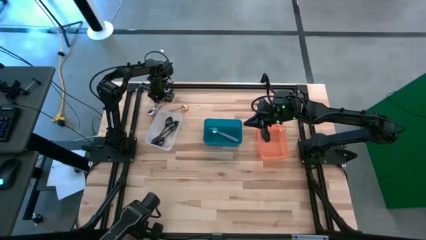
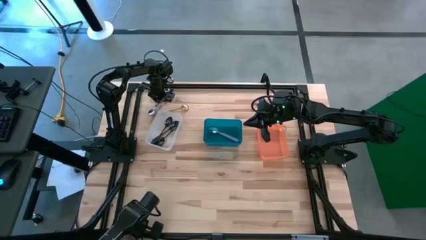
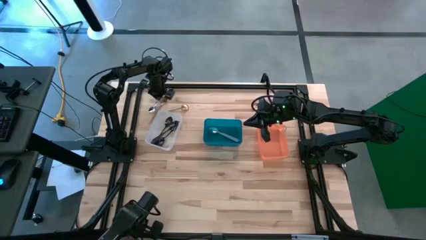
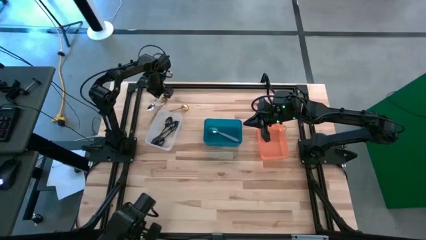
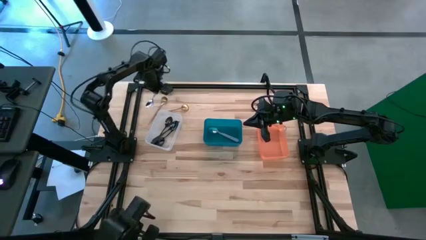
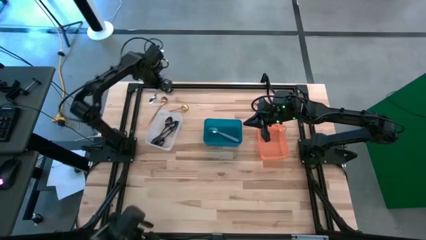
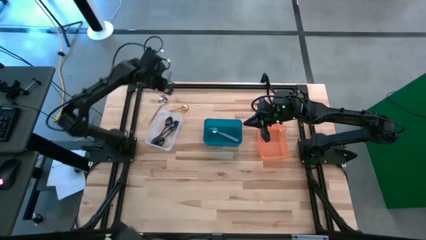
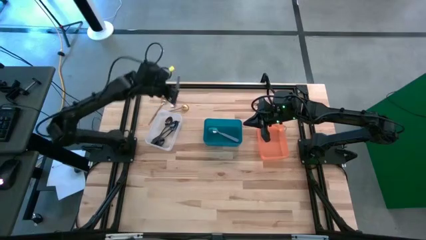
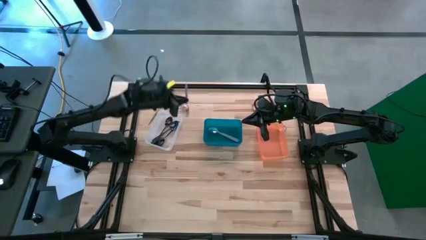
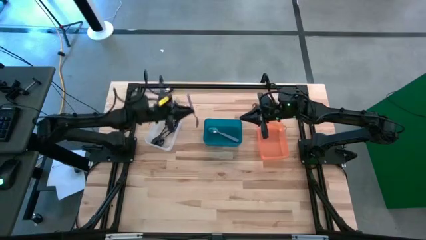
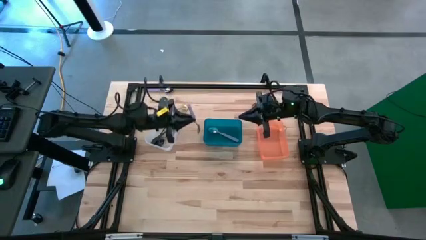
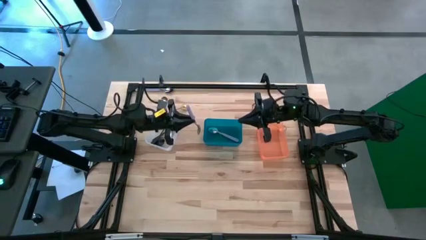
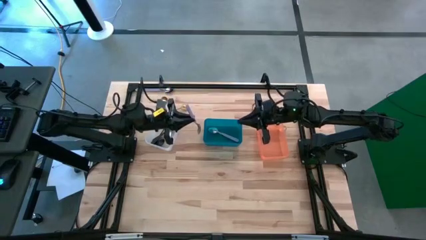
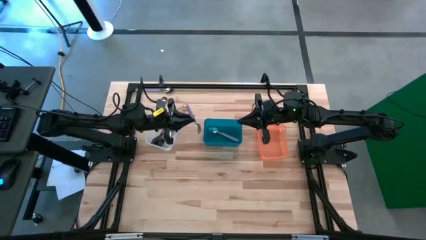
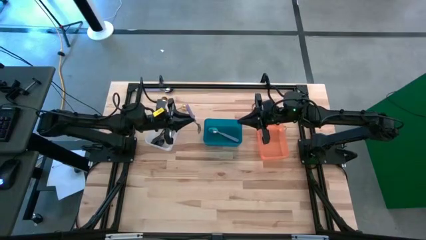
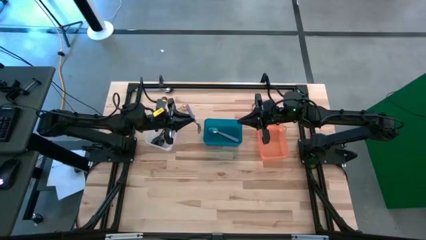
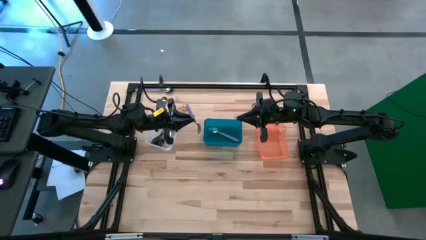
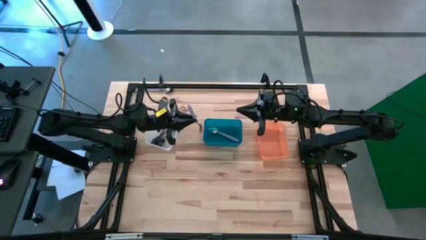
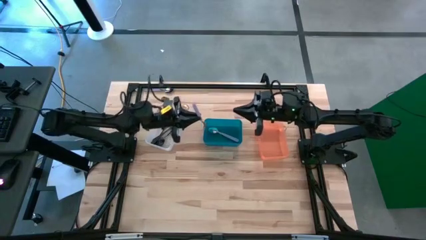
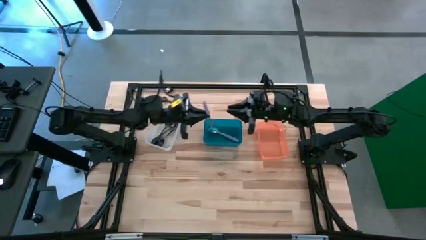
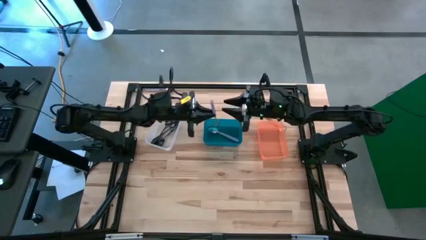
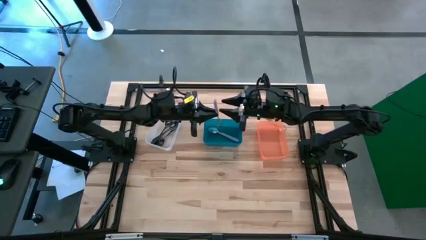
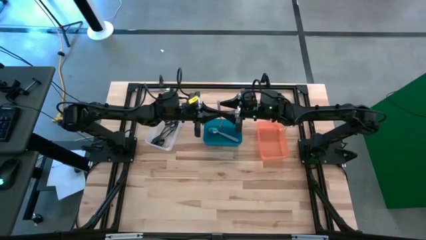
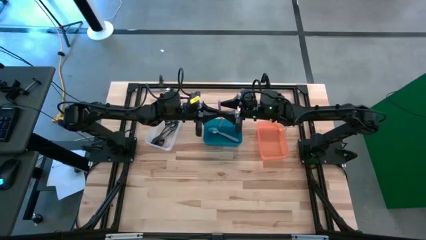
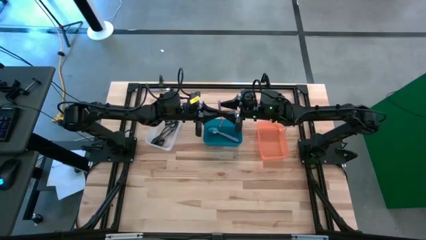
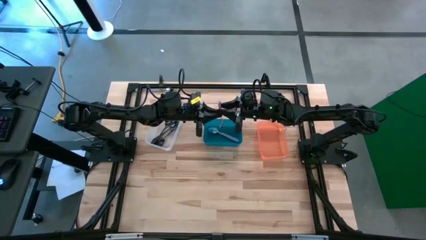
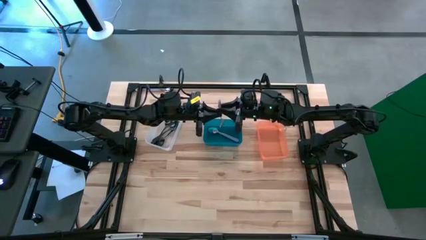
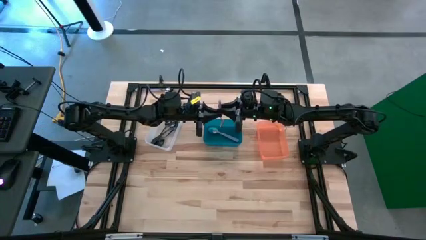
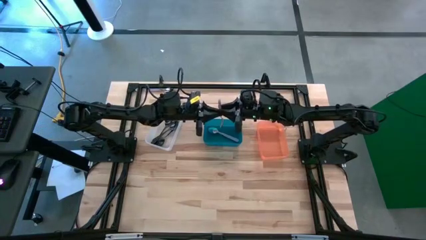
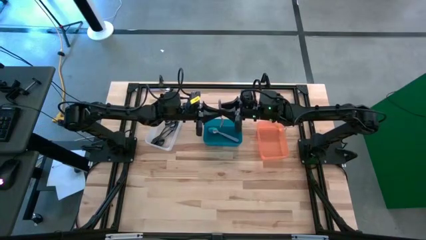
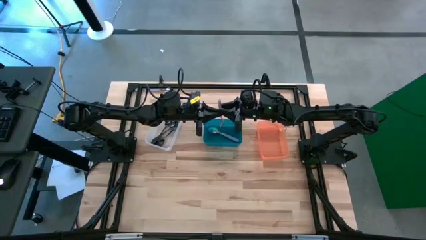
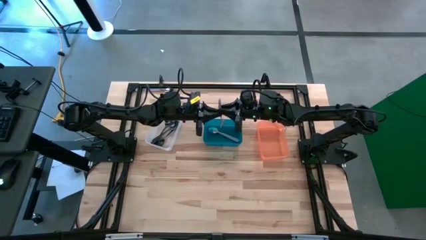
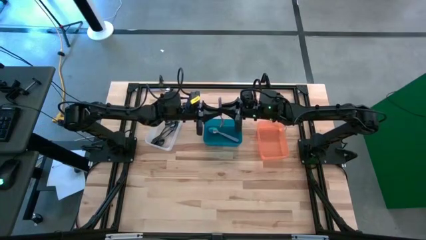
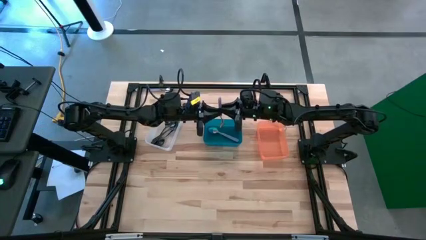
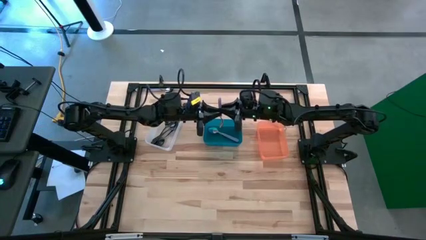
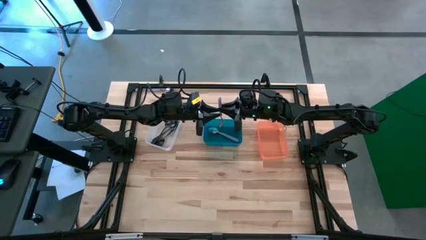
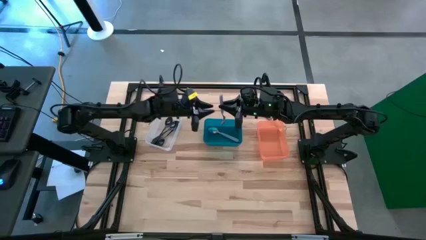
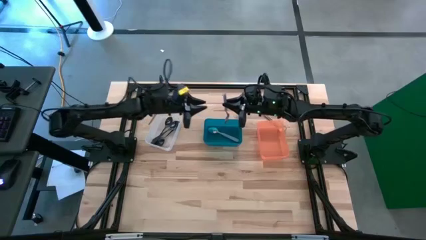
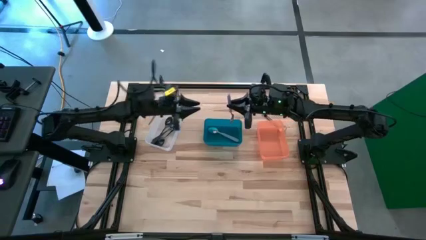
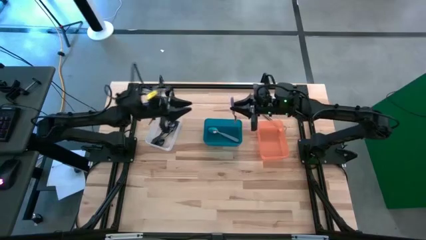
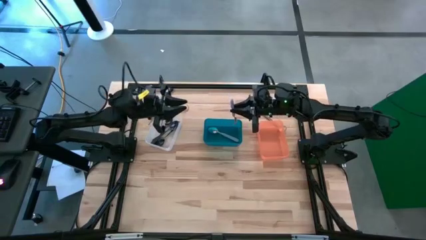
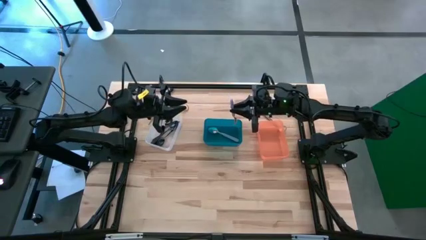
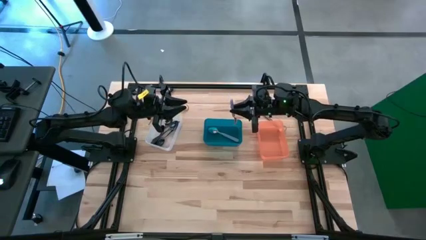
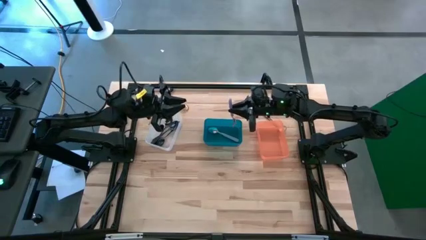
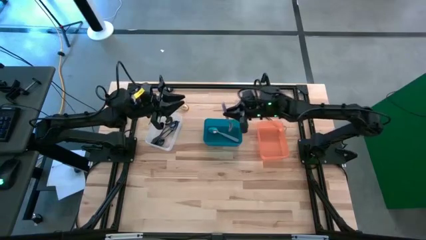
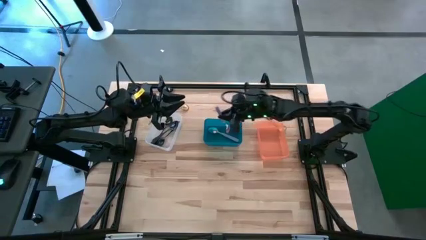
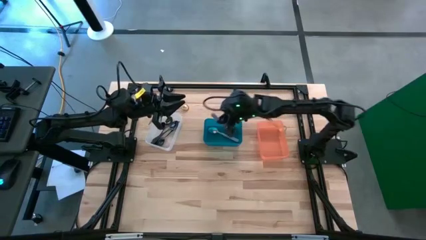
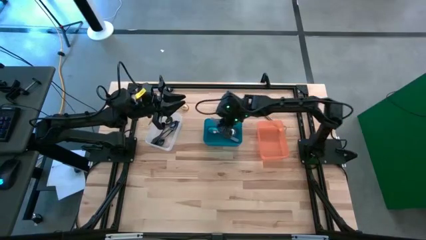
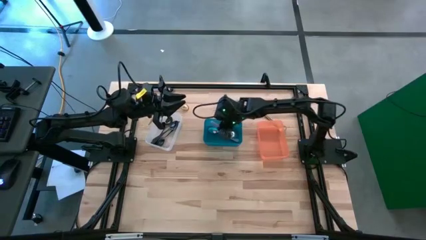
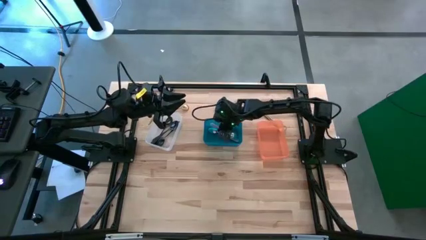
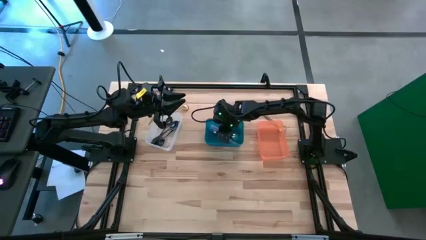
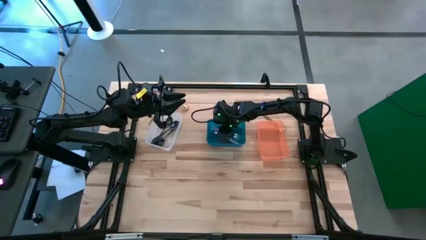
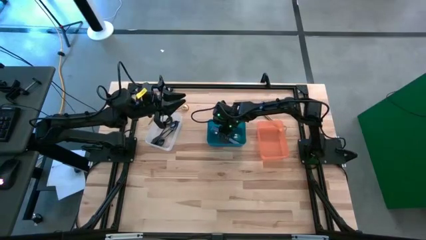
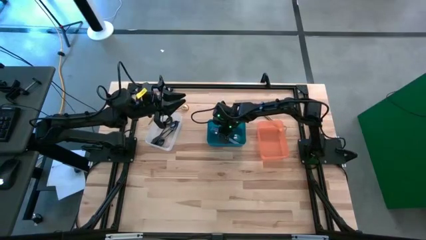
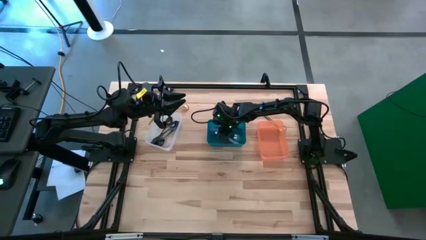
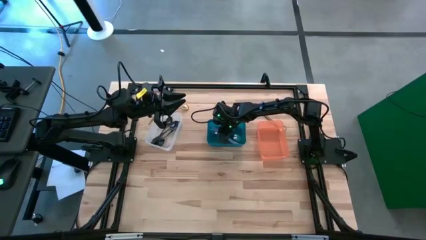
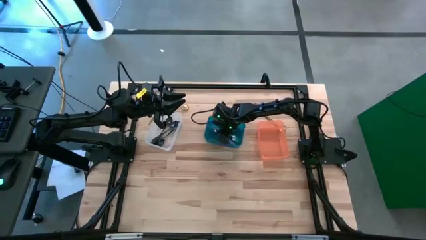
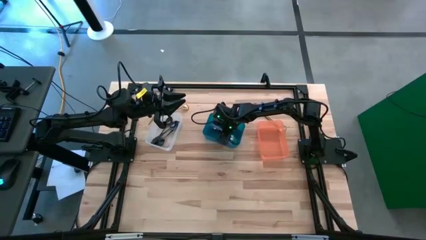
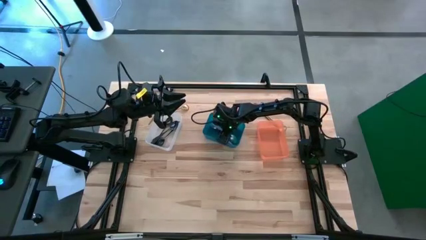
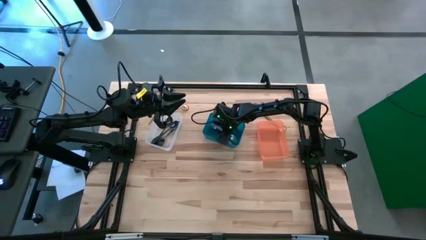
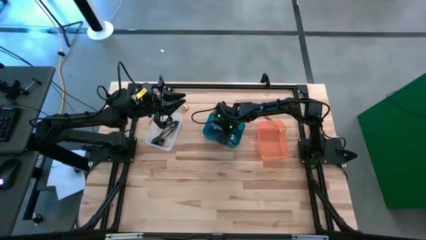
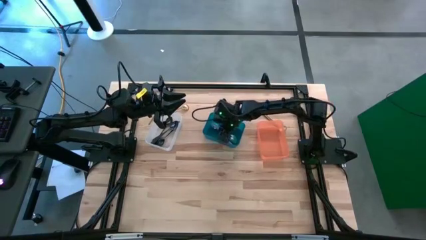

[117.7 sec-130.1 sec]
Task: Sort silverware by color (type)
Put the purple spoon into the blue bin
